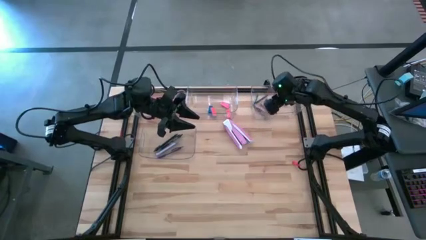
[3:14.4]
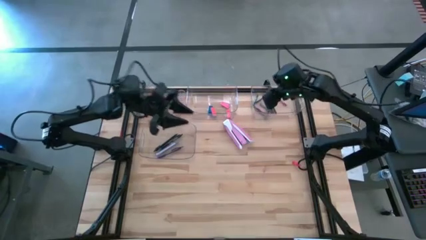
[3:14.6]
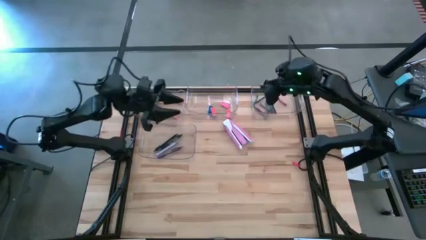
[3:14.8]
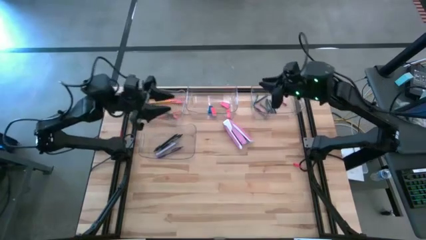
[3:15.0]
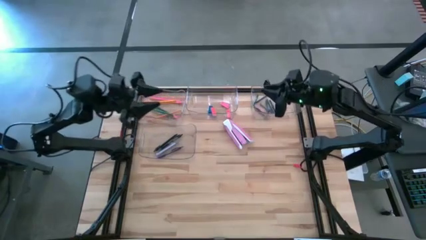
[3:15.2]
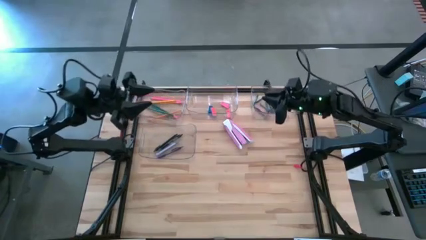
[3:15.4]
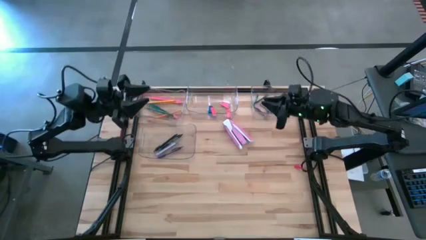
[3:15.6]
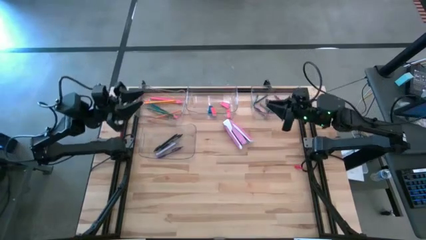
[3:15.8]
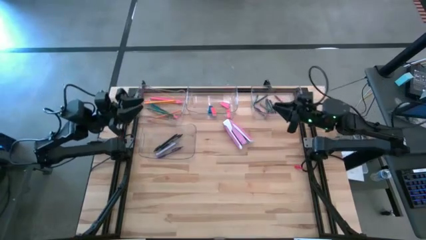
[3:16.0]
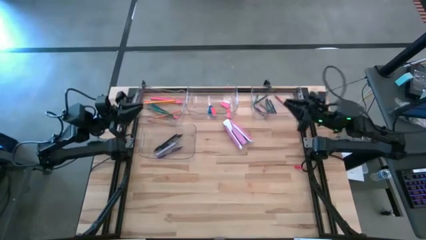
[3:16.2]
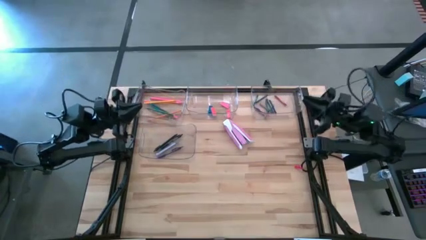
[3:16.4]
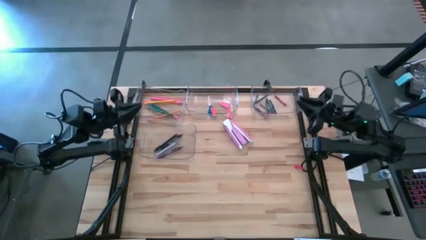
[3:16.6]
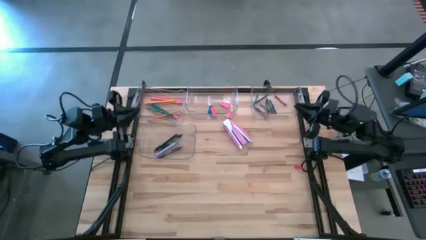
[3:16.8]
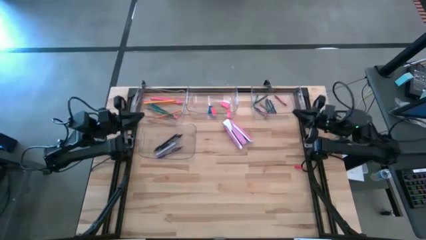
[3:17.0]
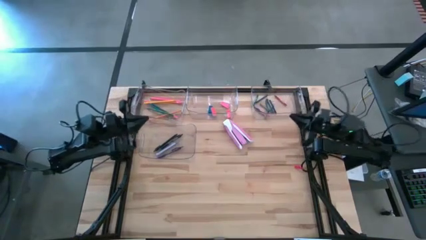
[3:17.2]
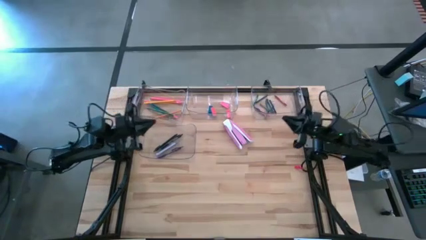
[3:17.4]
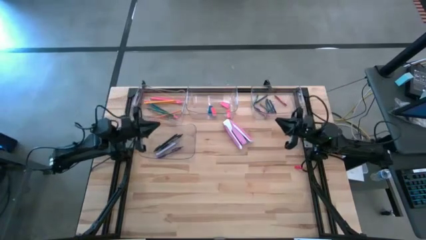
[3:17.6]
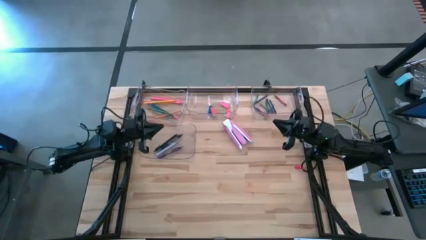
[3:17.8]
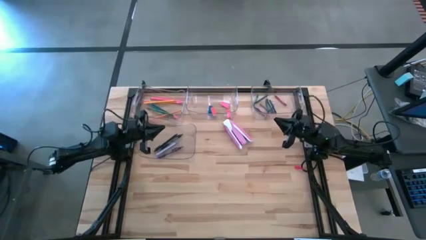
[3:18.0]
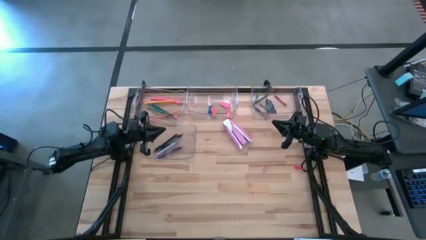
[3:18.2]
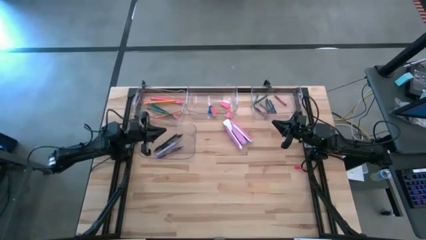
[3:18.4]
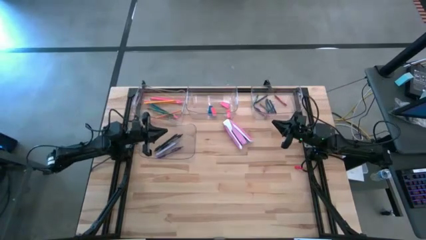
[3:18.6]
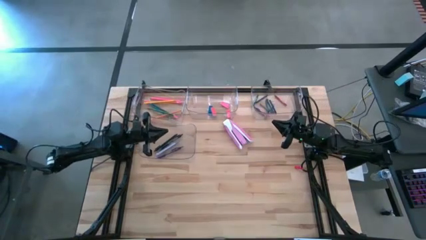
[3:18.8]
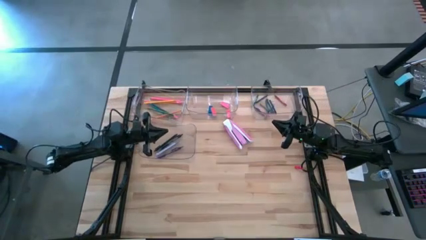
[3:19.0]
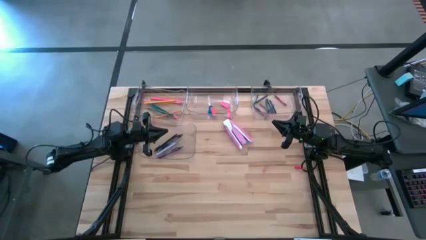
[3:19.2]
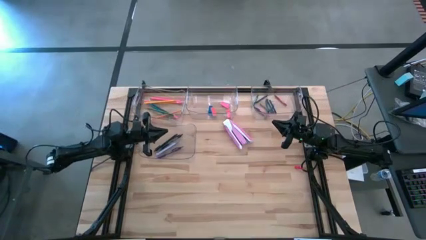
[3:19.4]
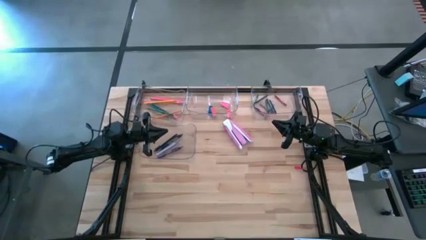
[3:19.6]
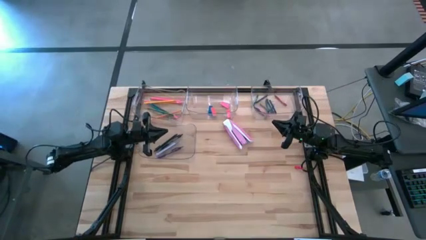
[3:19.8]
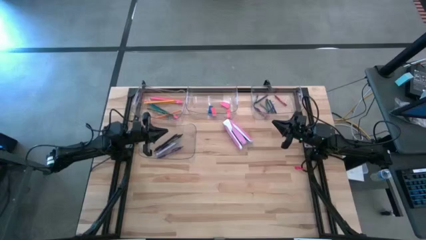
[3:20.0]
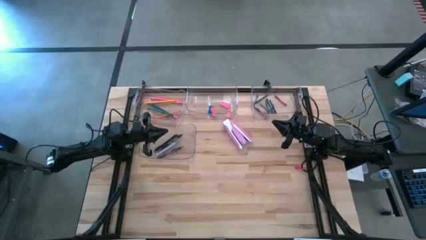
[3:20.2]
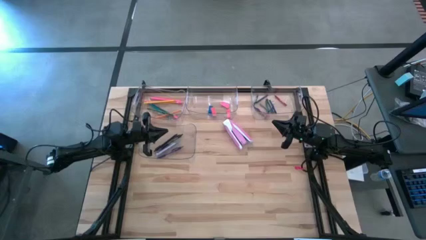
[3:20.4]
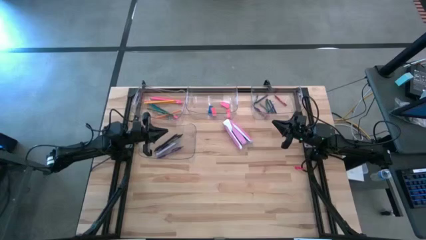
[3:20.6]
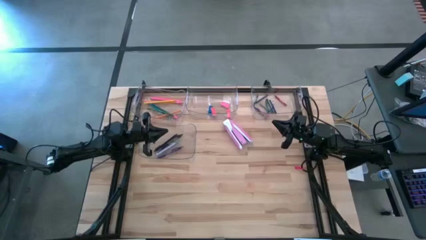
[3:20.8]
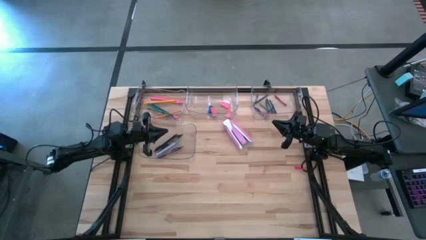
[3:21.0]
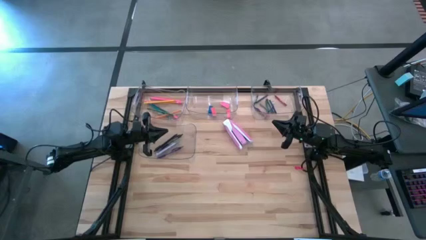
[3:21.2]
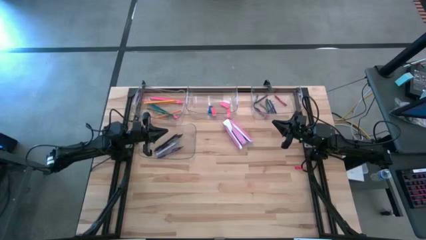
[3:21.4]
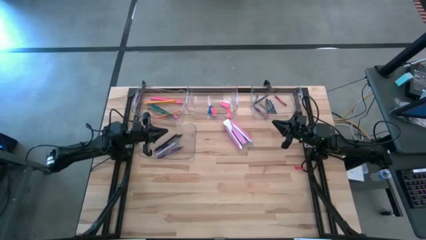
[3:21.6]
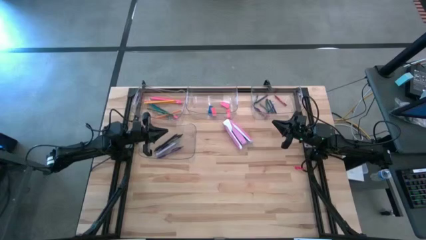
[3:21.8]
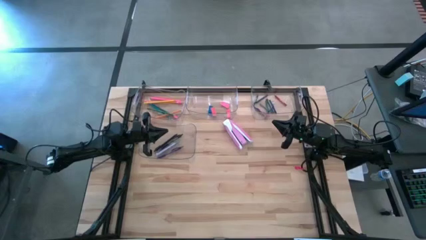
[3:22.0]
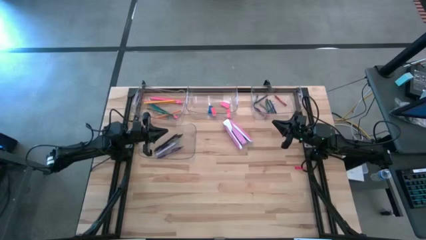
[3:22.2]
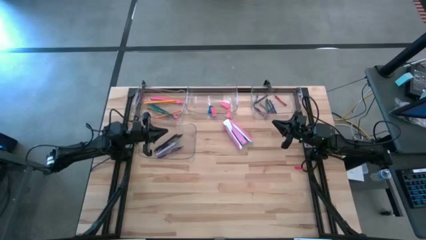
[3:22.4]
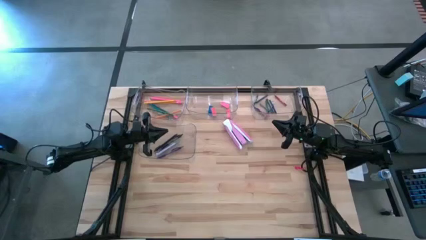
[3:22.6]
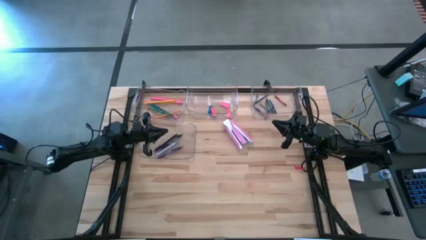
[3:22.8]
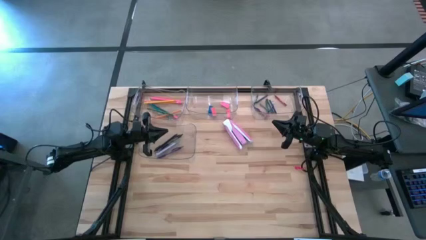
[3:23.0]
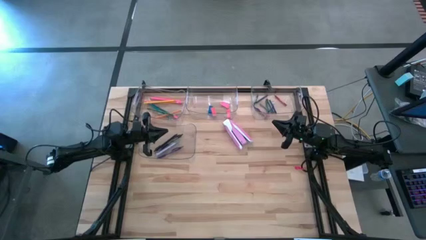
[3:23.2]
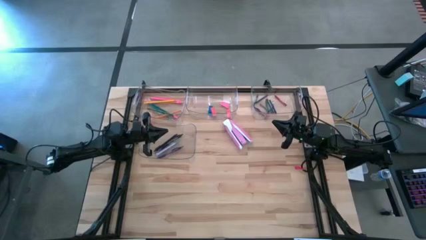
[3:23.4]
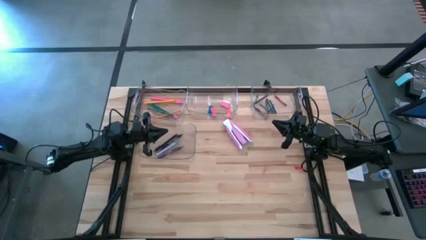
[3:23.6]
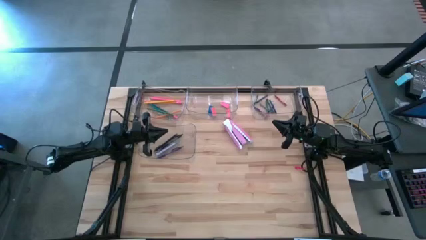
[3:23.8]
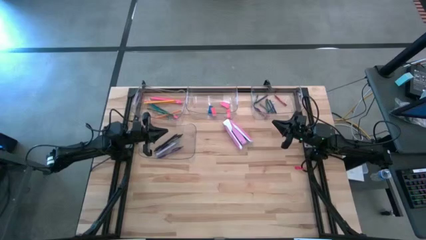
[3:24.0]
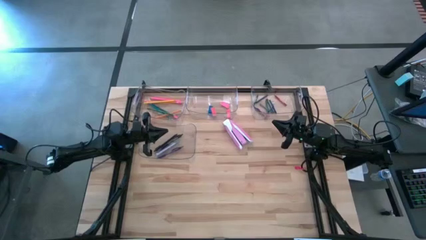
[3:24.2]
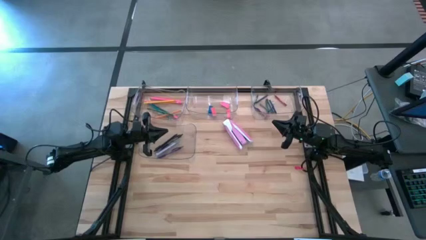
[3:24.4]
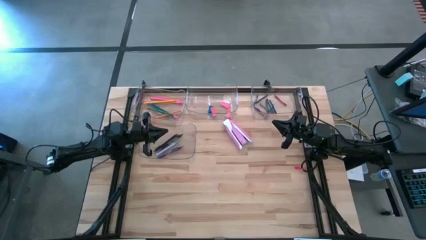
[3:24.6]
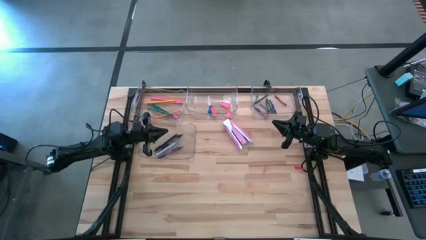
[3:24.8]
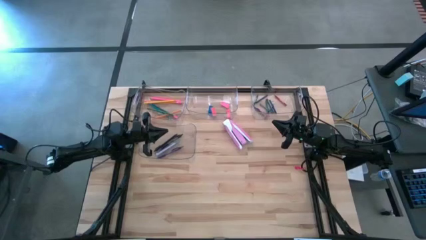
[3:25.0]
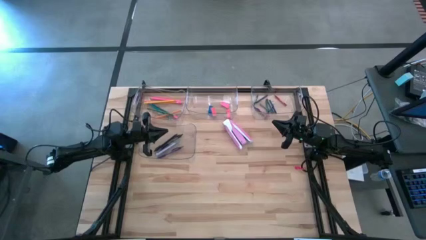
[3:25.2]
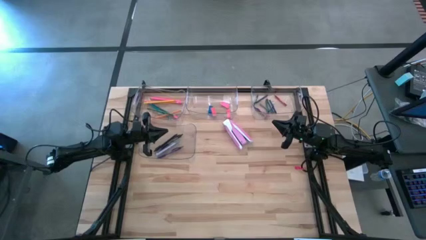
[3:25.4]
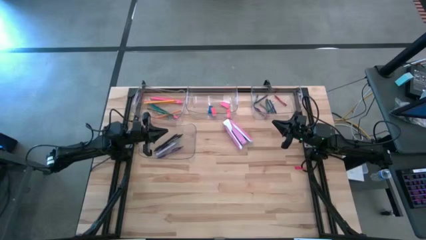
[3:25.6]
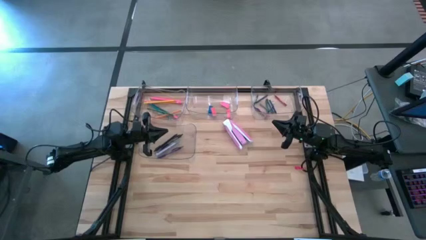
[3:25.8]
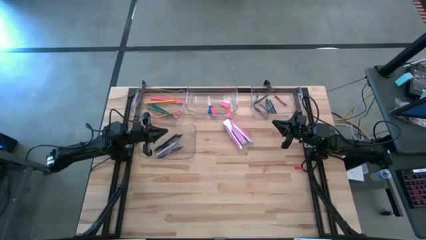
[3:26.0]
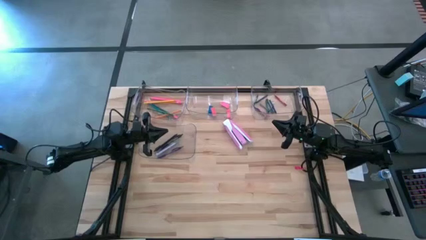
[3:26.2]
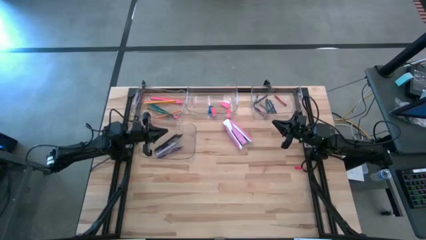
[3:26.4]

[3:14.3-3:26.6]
Task: Sort crayons/erasers/pens/pencils in bins
Return to Home Position

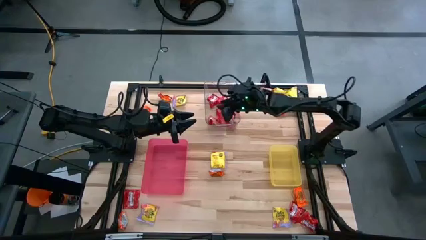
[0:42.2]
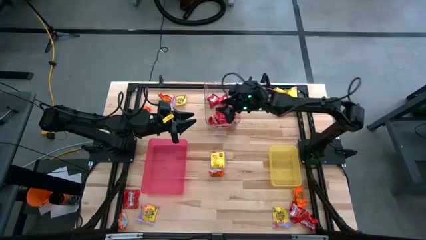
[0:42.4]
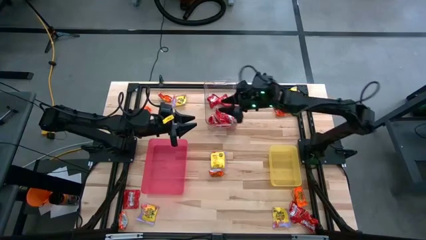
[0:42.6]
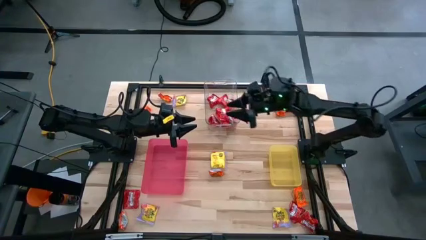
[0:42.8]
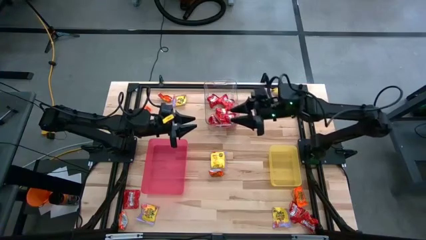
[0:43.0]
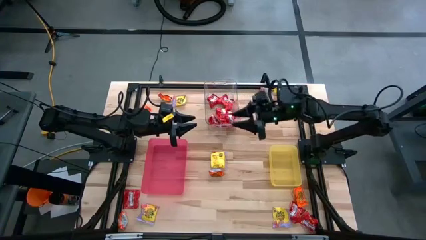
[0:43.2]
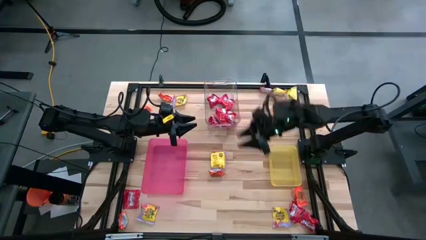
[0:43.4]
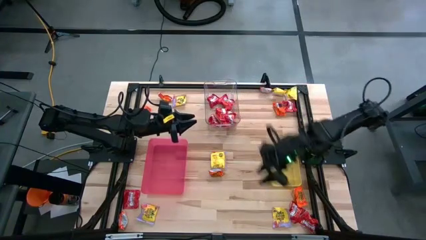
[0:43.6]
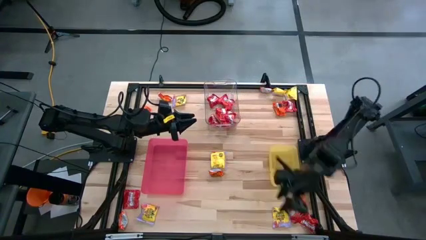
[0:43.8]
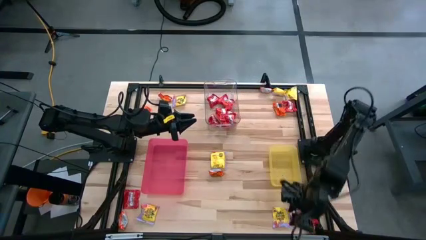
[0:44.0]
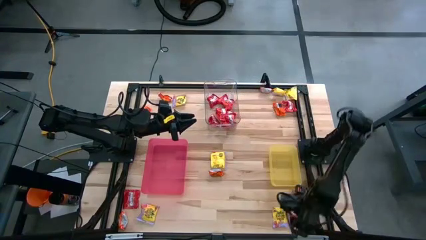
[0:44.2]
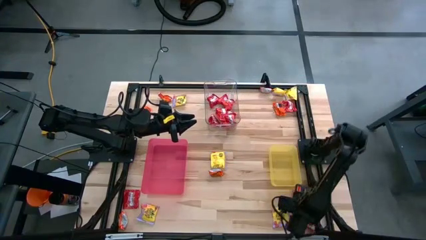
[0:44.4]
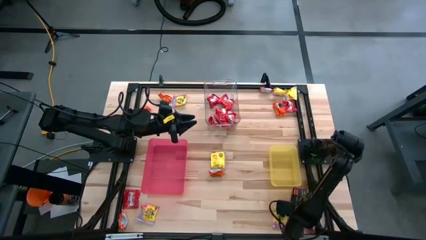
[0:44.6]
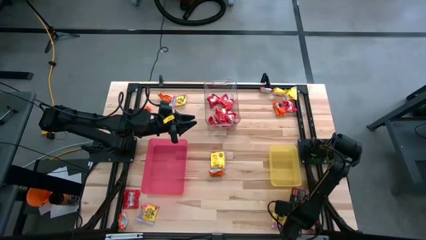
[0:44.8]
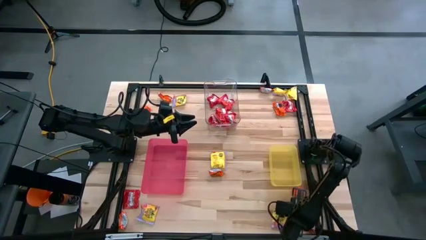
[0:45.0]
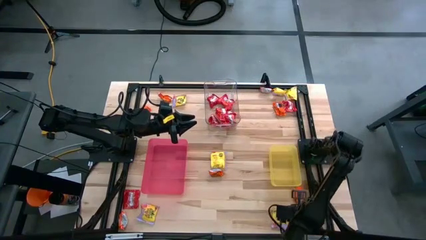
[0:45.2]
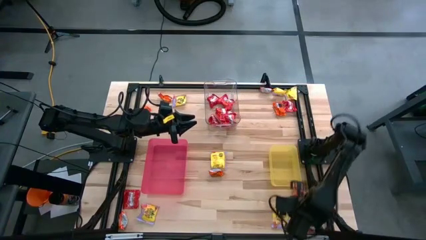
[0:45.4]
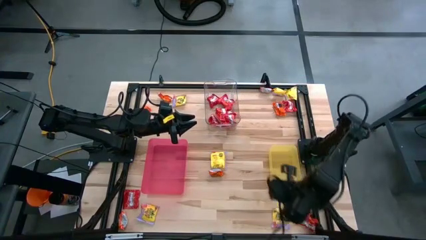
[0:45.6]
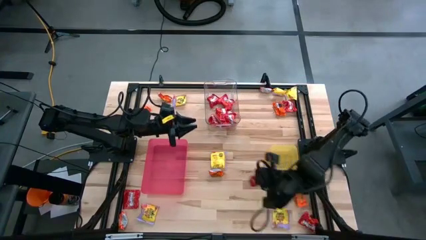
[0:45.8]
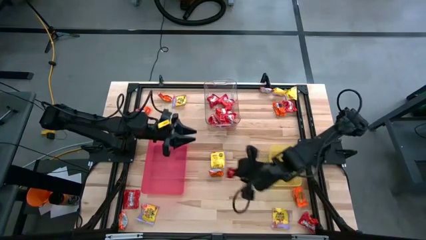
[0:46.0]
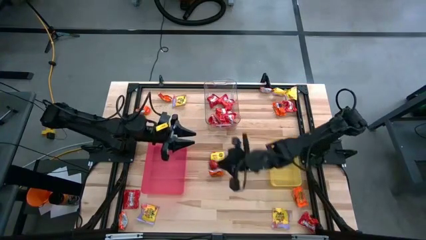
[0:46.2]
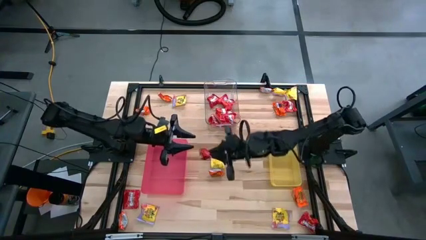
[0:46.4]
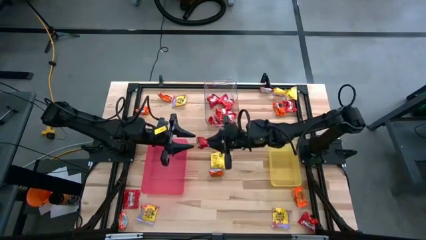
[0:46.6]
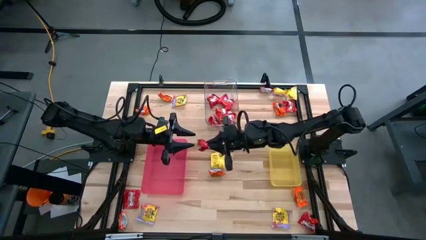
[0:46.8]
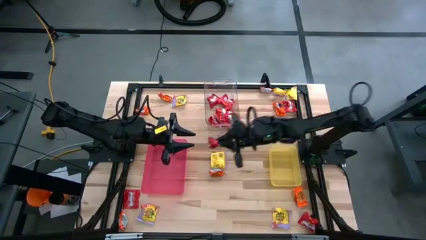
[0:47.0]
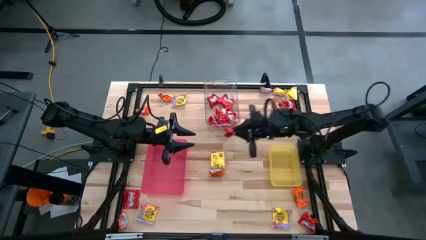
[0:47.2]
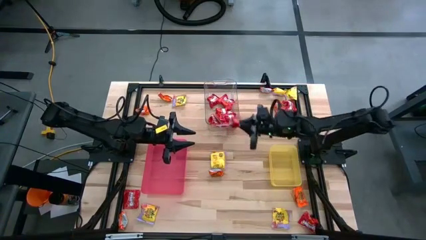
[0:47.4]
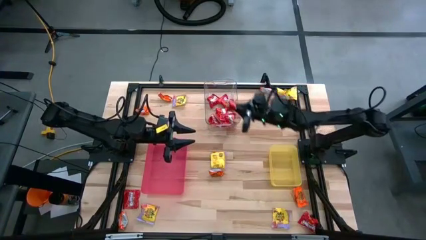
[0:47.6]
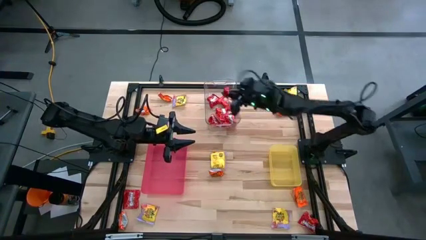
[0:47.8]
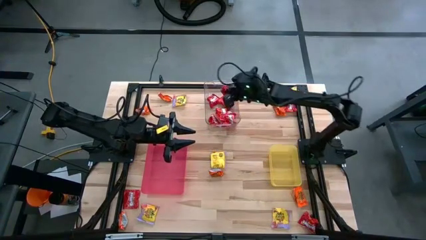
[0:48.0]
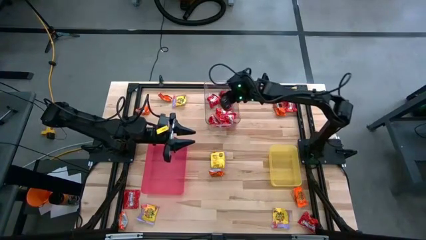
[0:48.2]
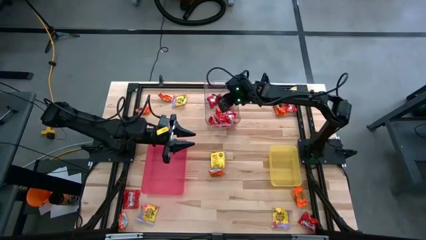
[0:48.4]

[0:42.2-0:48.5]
Task: Sort candy
Put the red candy into the transparent bin
